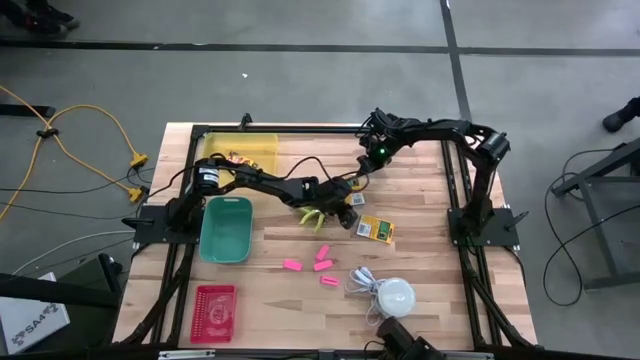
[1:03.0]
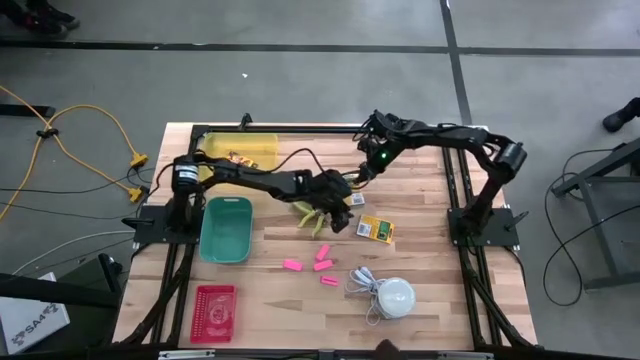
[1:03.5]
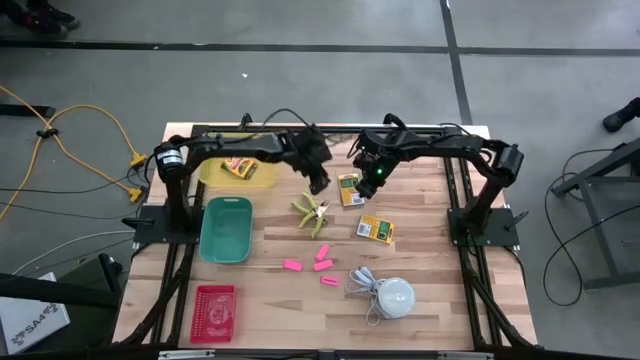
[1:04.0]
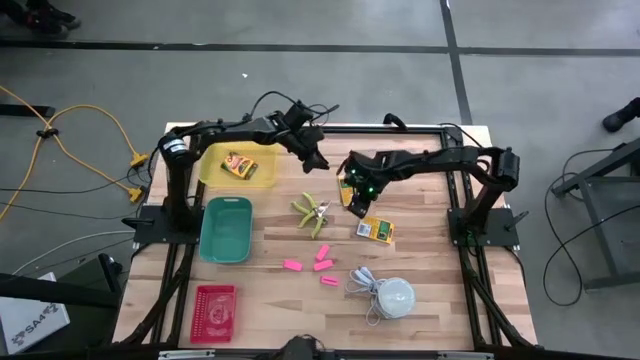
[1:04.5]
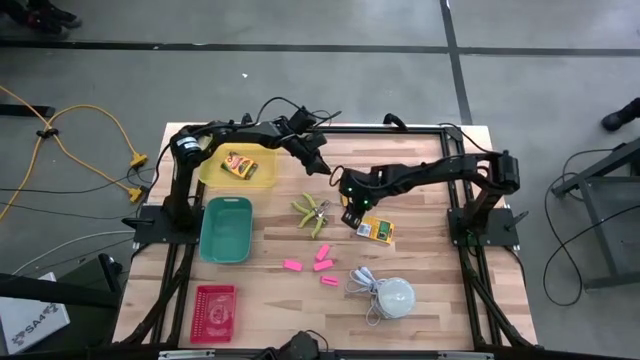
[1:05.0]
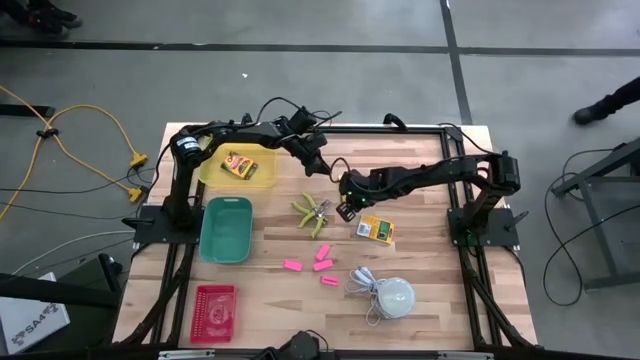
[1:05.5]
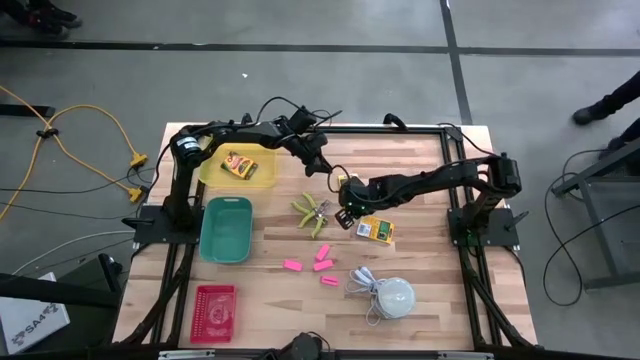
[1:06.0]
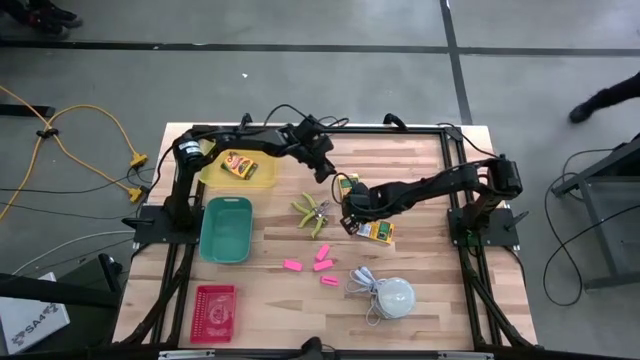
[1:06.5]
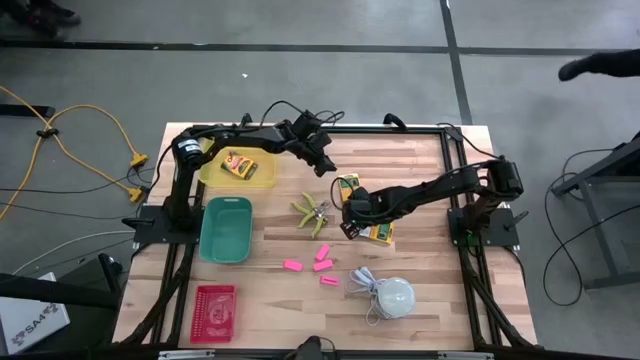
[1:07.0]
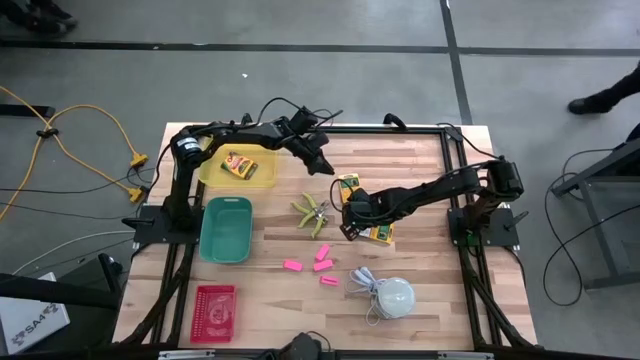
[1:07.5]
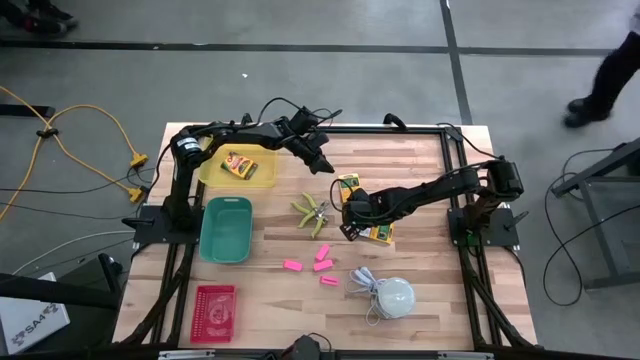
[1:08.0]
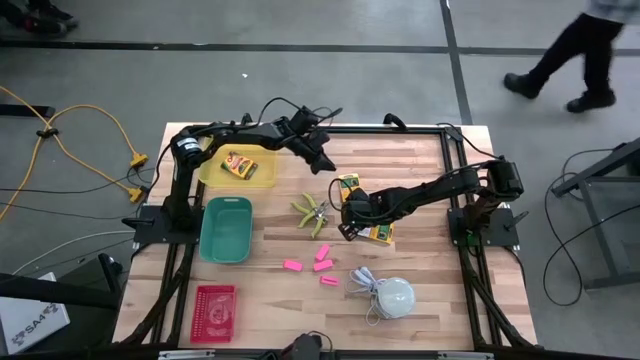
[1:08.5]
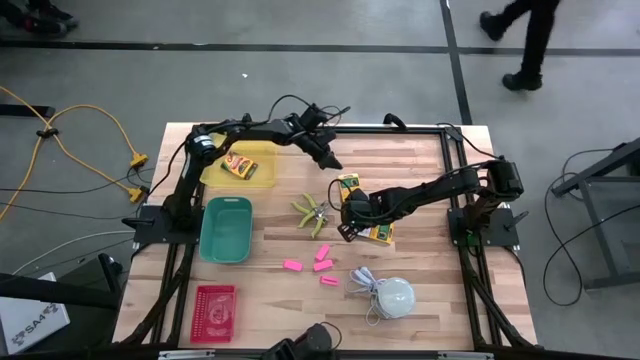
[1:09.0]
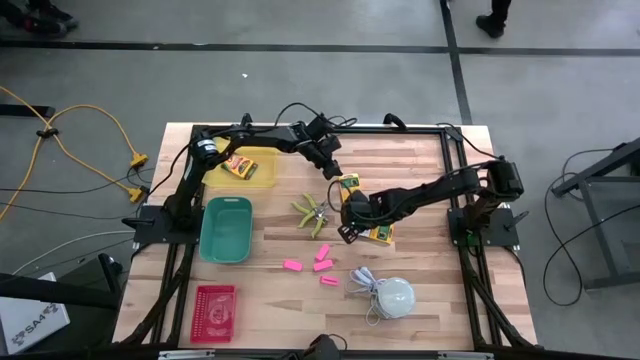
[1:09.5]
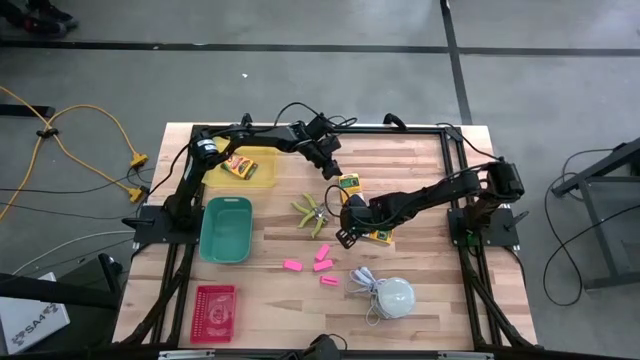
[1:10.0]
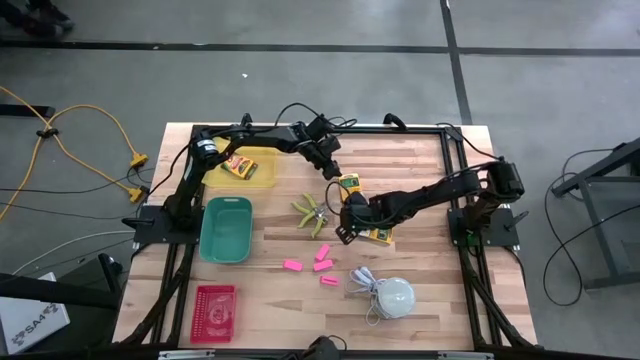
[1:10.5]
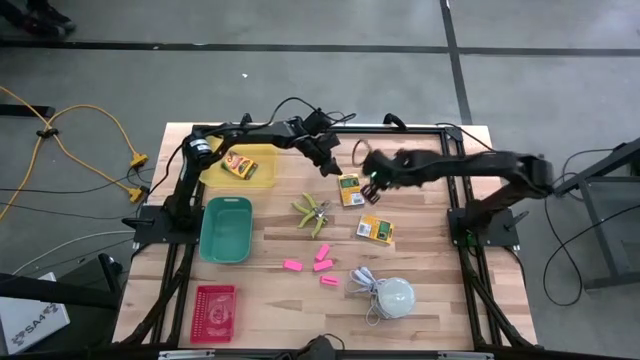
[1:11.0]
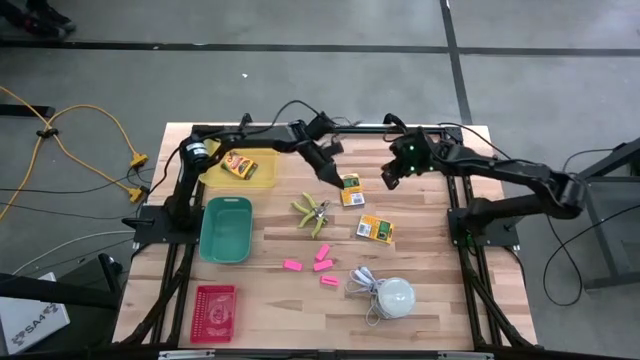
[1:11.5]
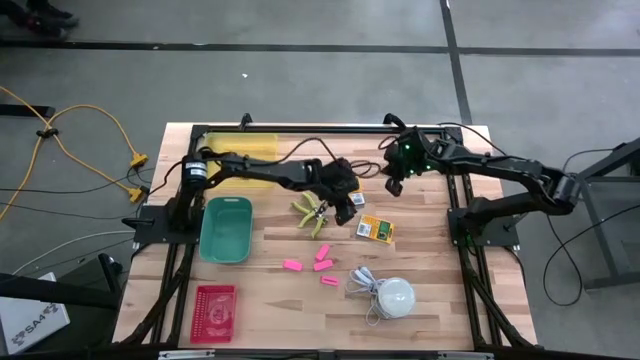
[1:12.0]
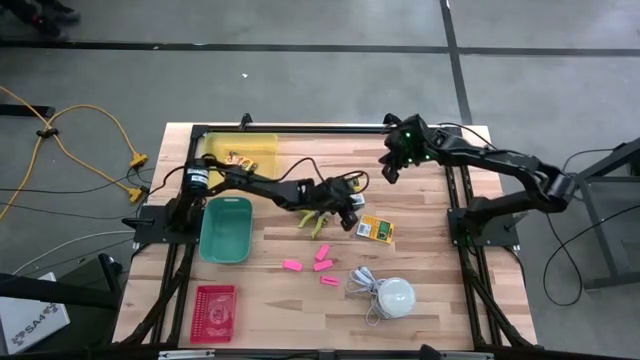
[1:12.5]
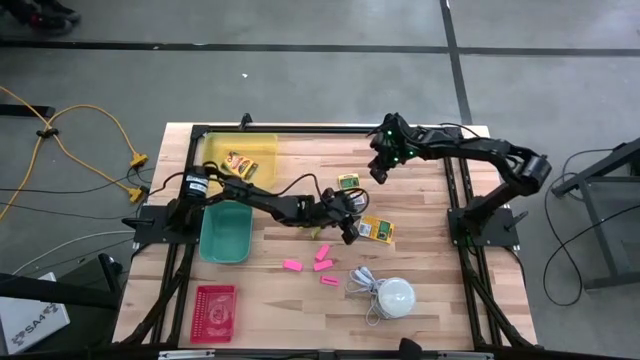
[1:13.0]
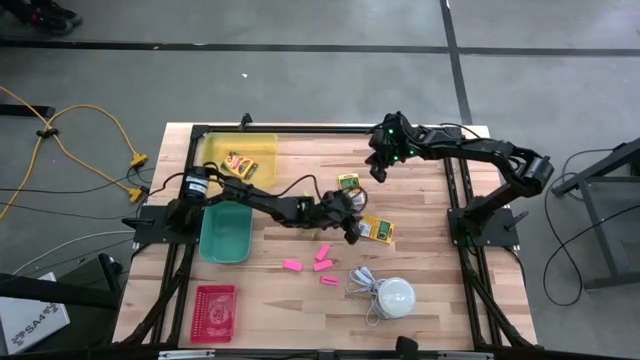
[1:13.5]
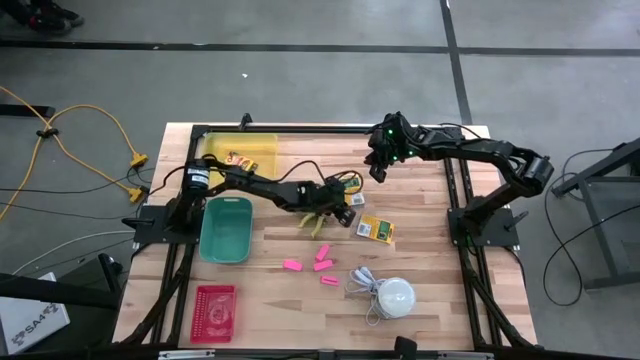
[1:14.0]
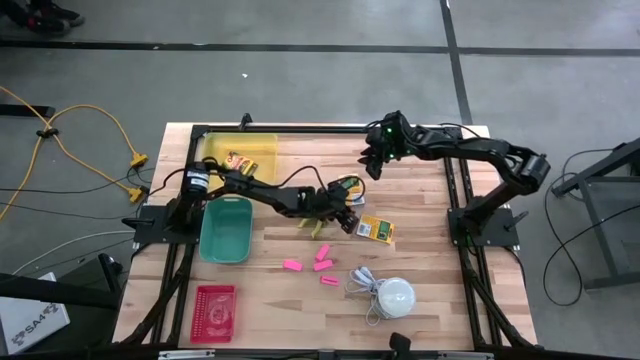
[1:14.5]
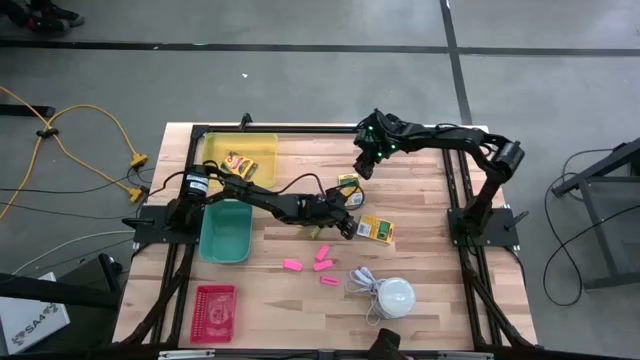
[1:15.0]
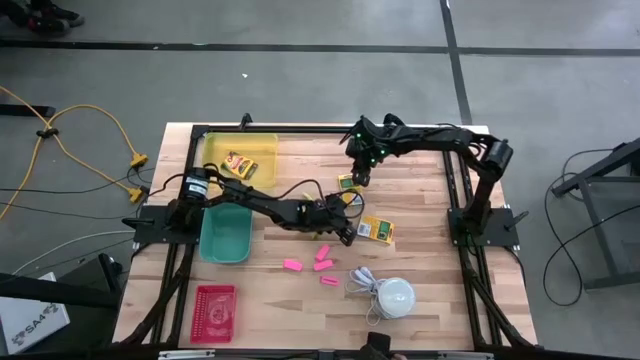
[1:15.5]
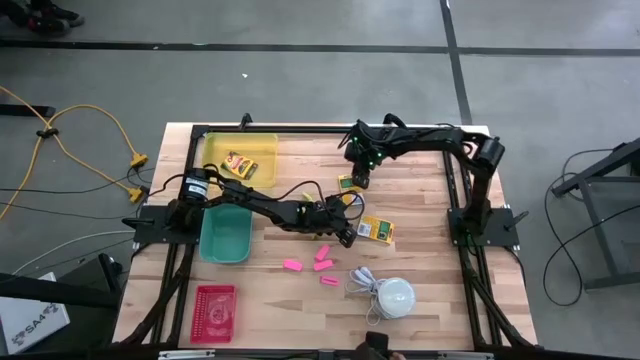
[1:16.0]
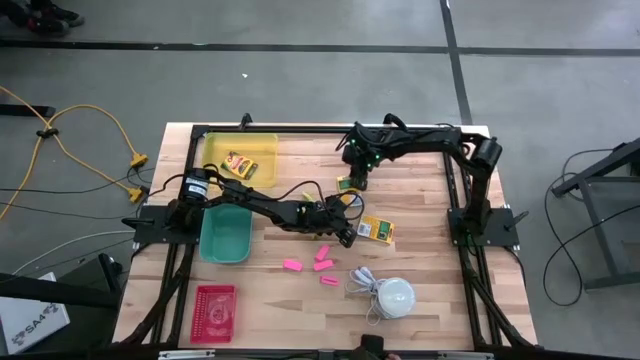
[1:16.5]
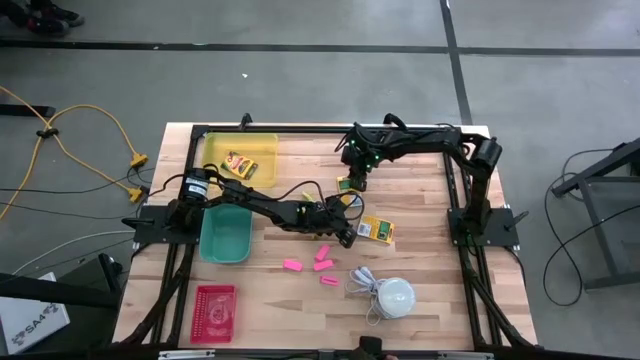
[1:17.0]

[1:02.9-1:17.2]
Task: Pick & Place School Supplies
Put the top yellow crayon box into the yellow bin

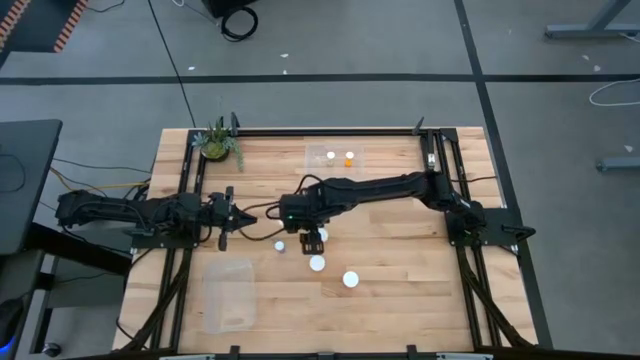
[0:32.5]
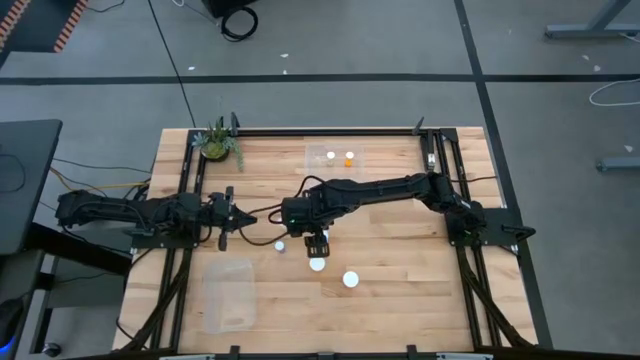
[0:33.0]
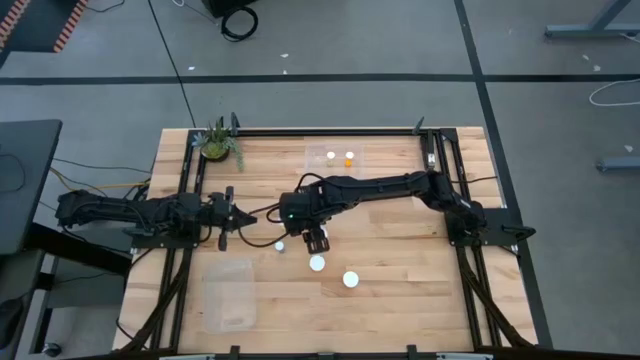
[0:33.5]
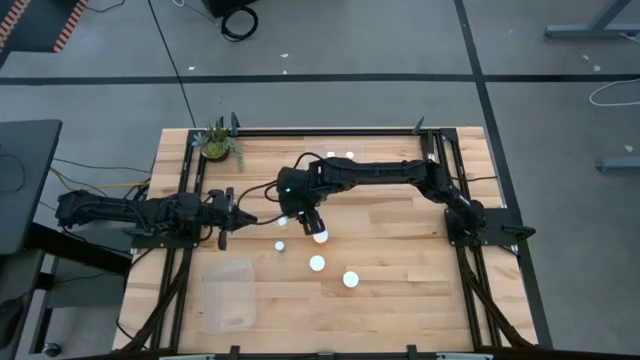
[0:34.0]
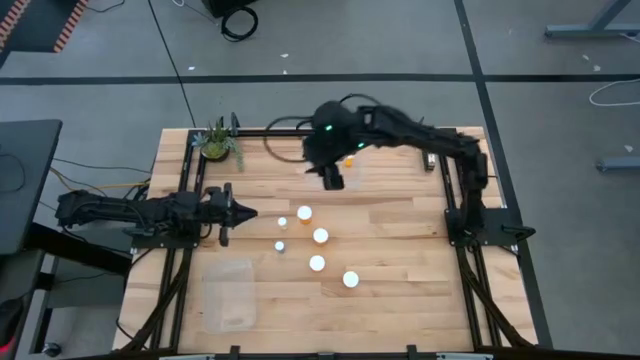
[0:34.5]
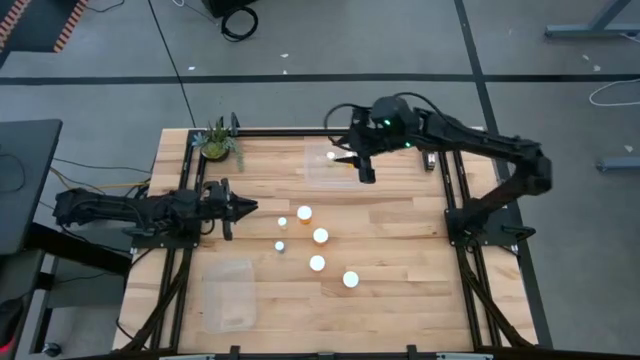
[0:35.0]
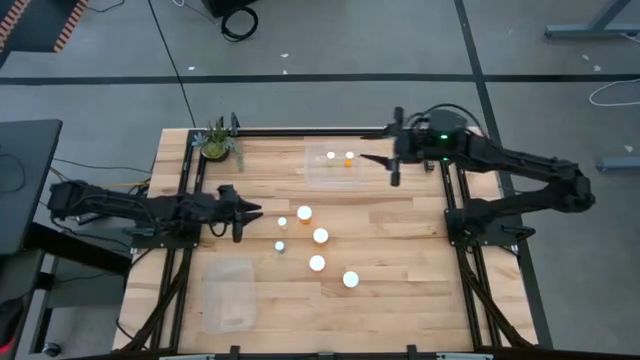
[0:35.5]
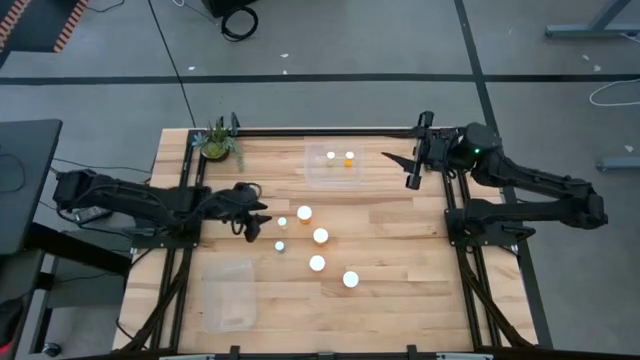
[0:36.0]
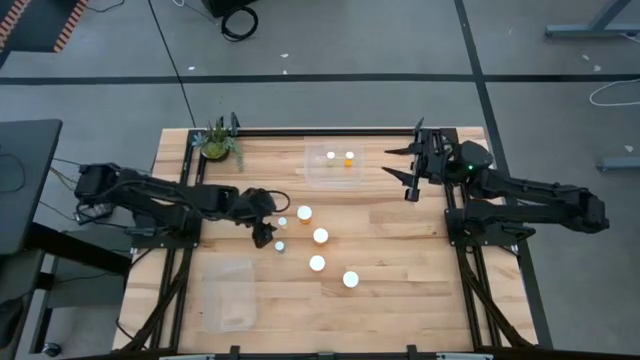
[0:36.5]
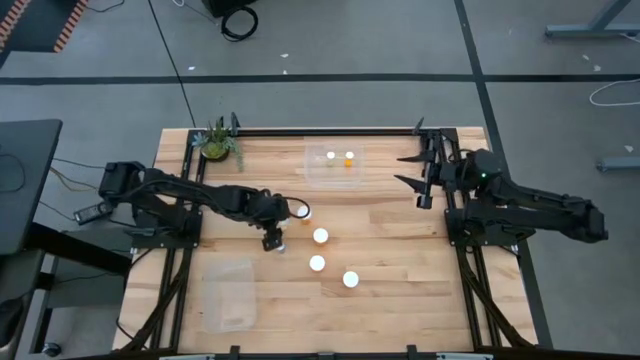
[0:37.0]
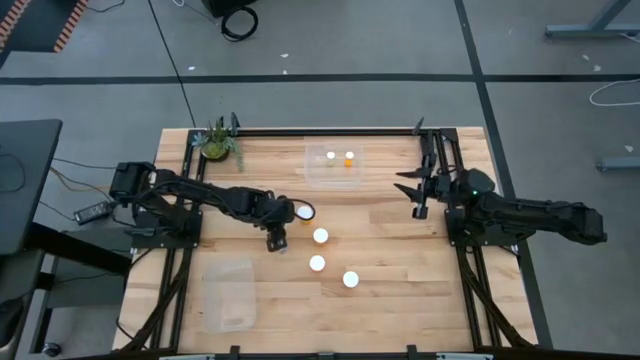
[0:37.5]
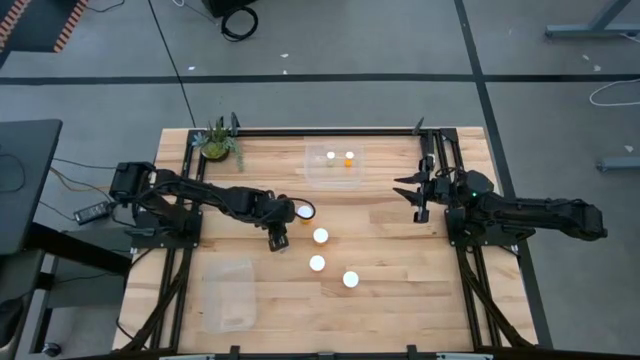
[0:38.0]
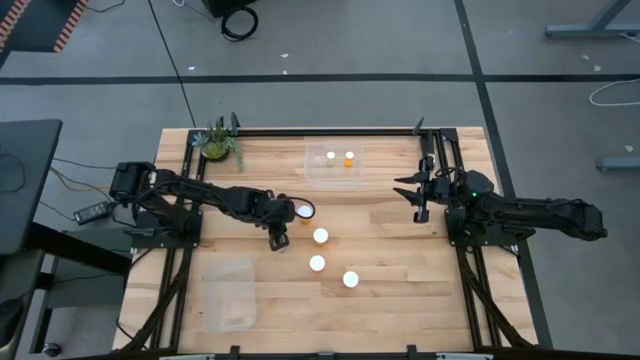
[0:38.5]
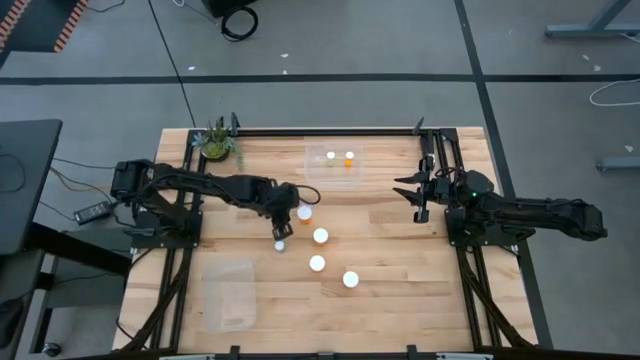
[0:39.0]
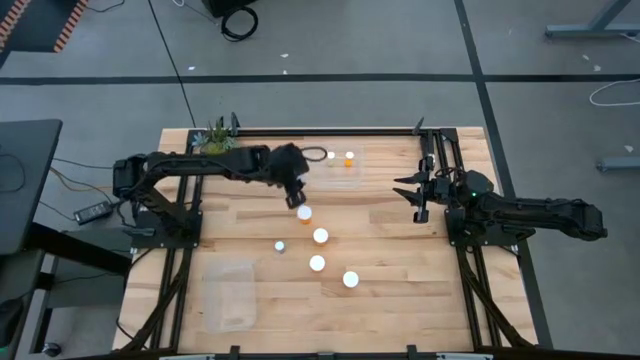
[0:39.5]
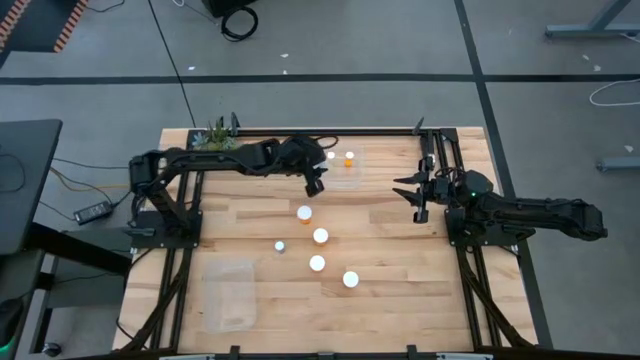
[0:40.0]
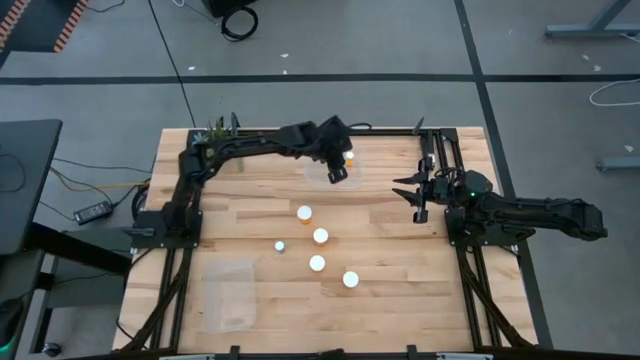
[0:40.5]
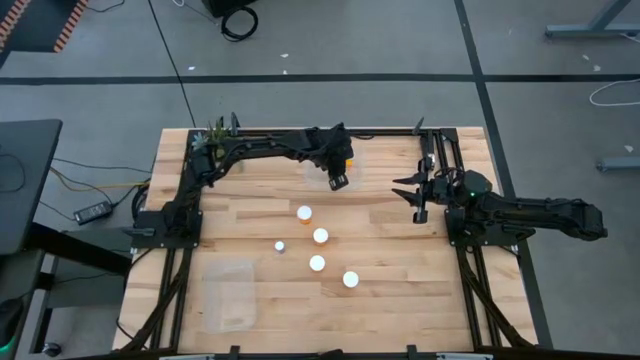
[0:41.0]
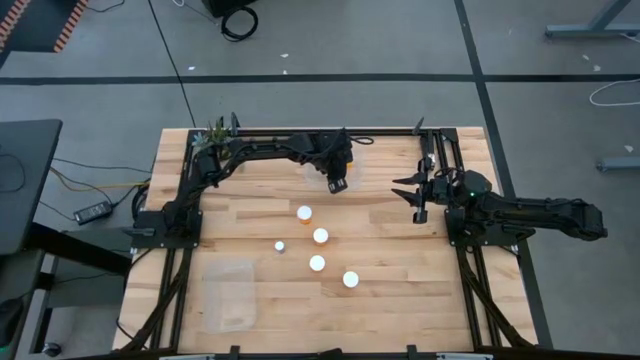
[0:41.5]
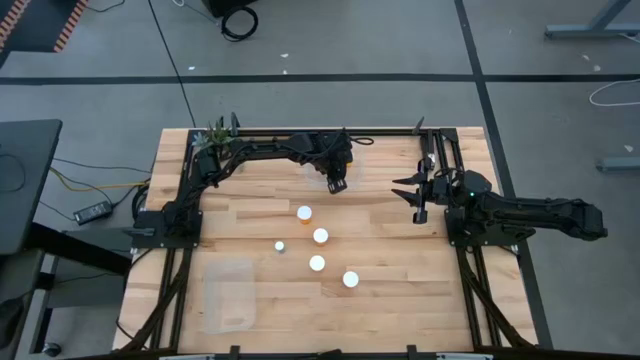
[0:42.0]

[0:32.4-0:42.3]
Task: Pick and place medicine bottles into bin by pill shape (circle, oval)
Put the yellow tablet bottle into the top transparent bin
